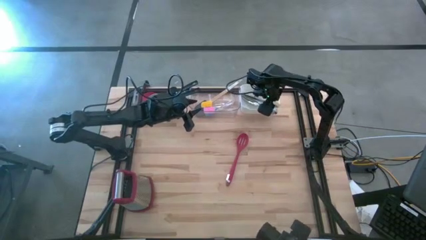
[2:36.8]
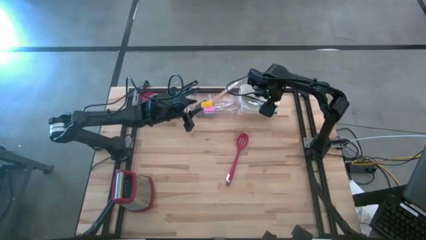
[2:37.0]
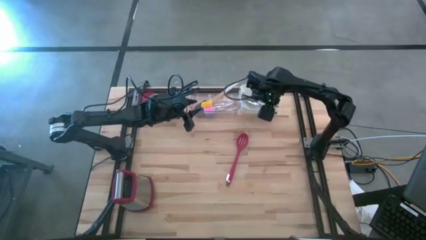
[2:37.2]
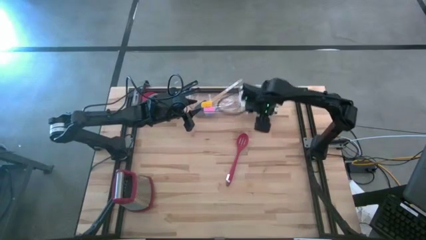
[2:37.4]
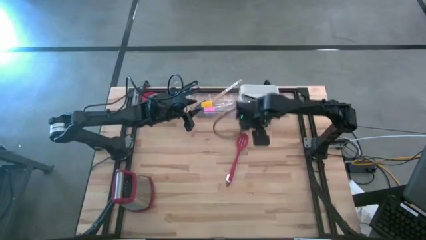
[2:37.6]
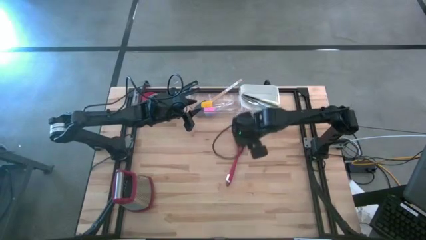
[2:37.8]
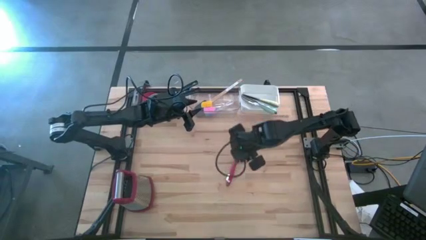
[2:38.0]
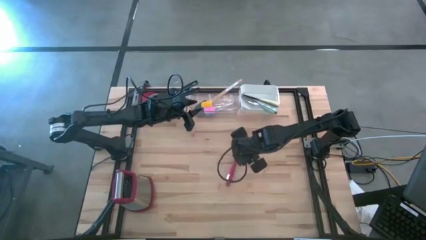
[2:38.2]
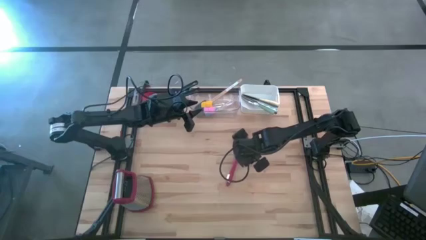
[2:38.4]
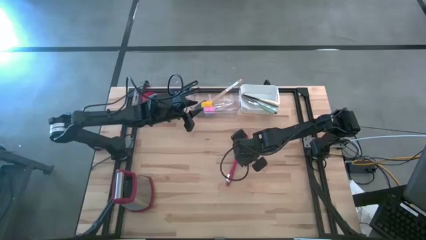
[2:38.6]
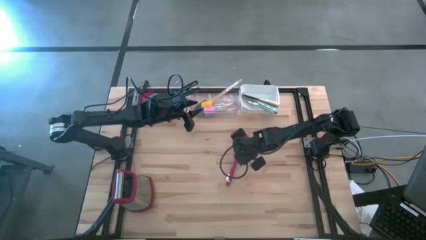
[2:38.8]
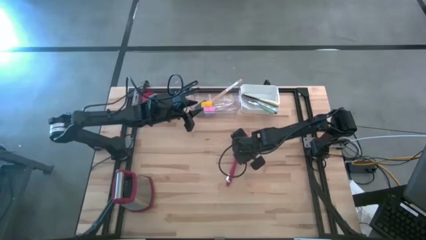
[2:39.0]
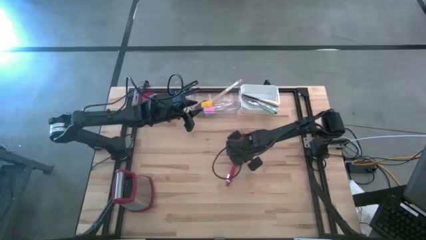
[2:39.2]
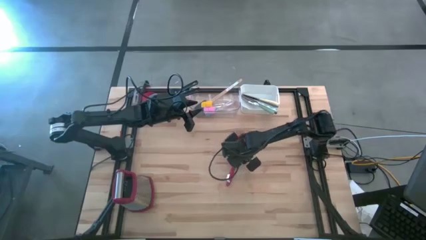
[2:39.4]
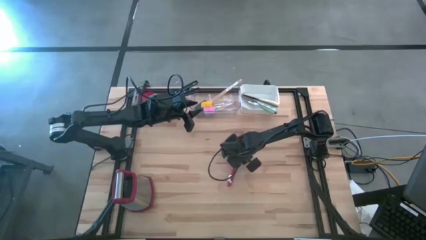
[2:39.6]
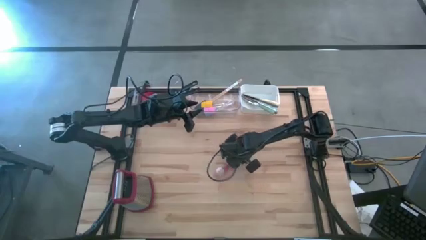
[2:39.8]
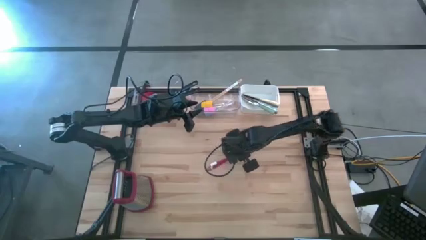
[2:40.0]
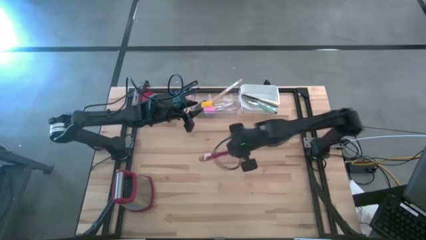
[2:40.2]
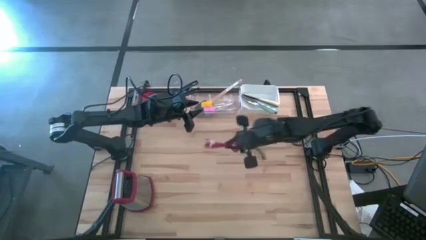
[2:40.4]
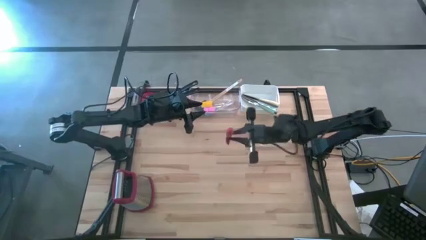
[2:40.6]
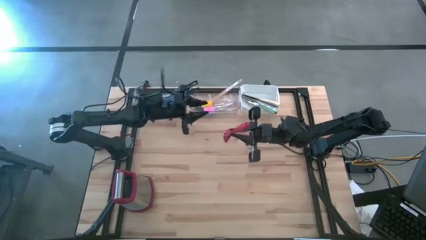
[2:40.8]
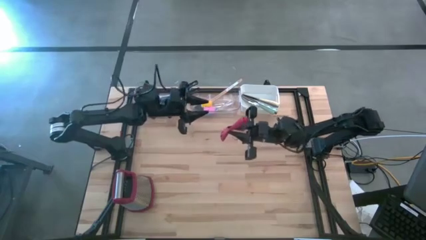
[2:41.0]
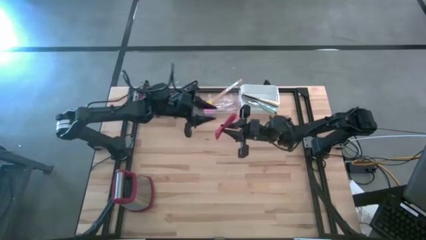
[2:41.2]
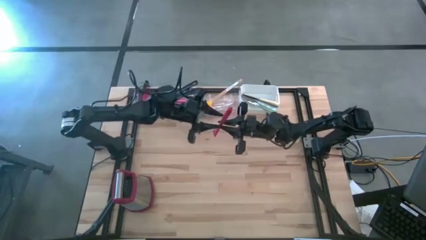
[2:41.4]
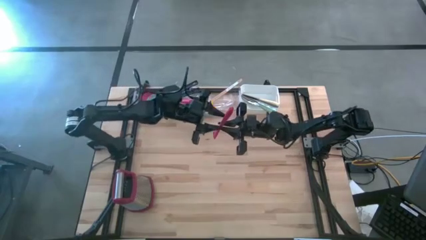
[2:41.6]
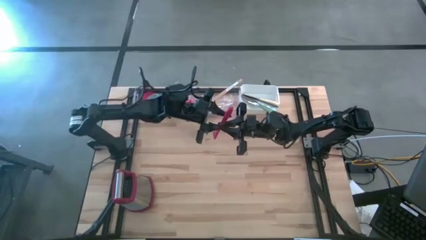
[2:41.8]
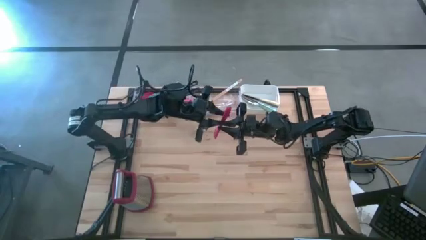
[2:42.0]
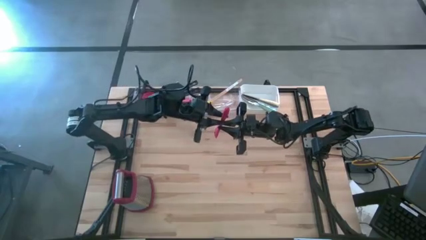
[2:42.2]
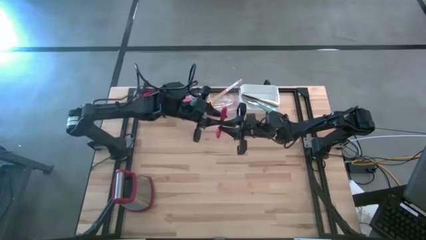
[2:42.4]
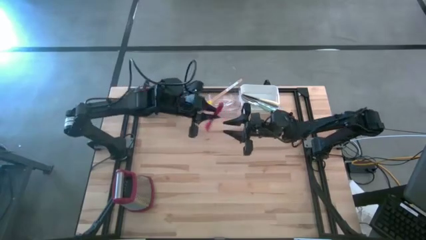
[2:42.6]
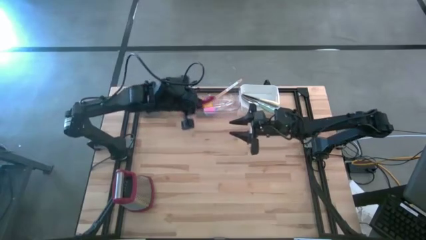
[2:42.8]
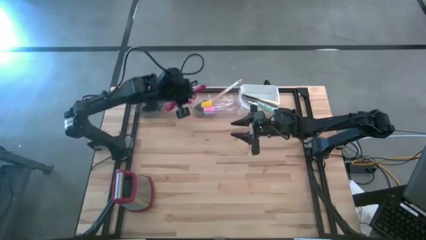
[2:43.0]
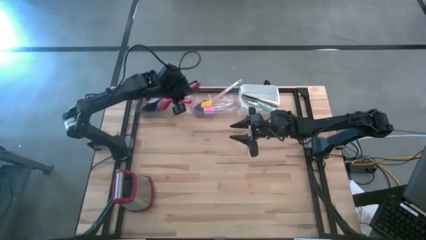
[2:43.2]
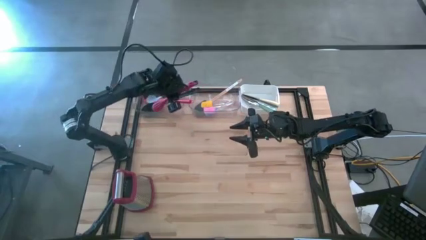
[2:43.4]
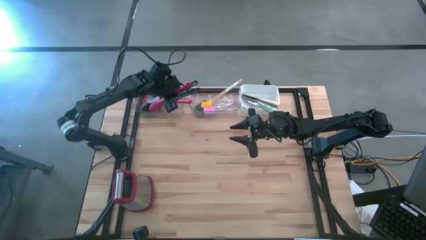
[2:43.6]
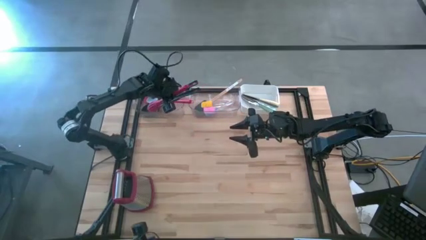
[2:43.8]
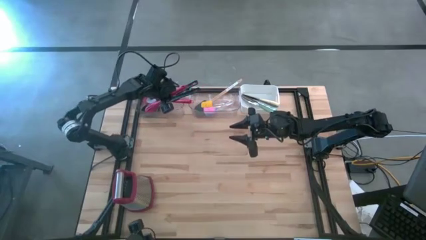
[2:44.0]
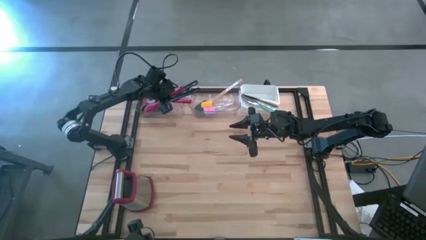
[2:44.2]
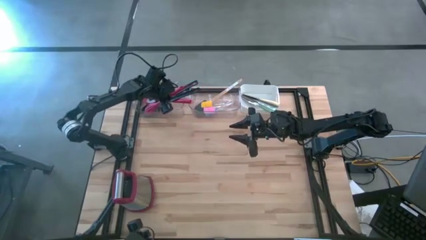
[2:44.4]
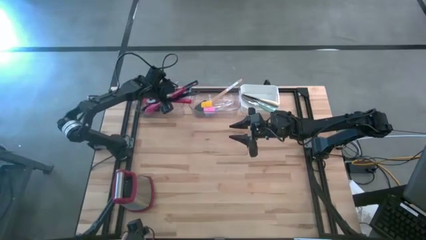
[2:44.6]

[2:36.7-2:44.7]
Task: Pick & Place Kitchen Items
Put the red serving spoon into the left transparent bin

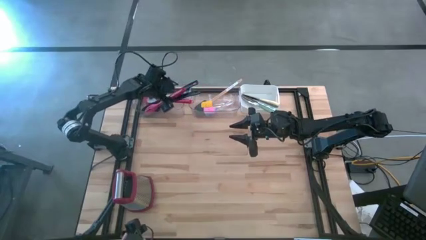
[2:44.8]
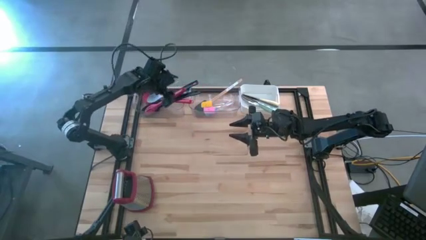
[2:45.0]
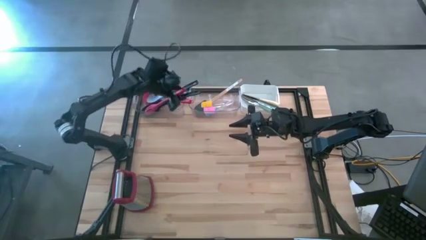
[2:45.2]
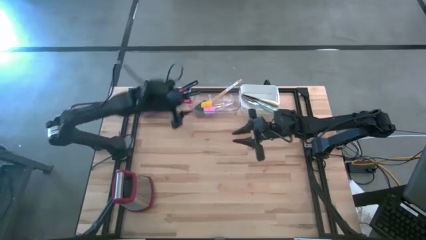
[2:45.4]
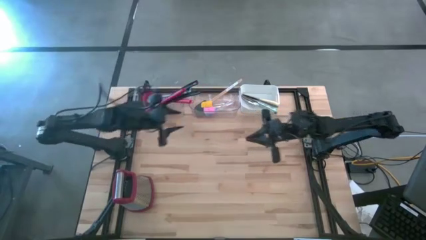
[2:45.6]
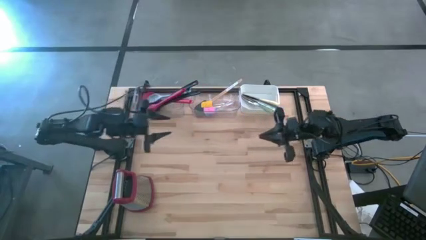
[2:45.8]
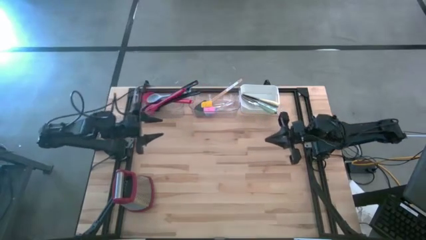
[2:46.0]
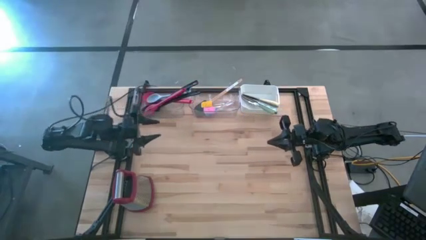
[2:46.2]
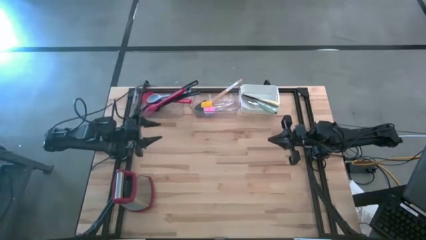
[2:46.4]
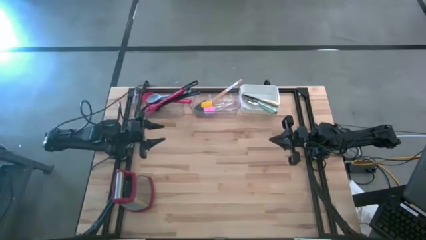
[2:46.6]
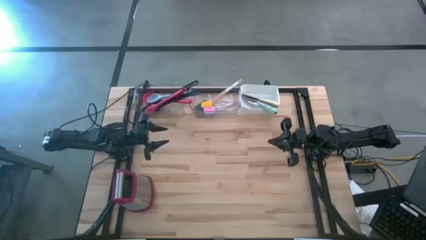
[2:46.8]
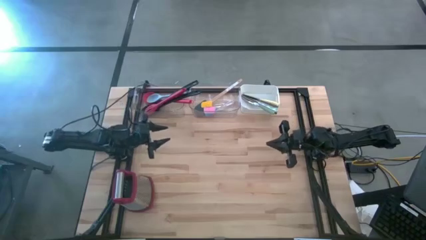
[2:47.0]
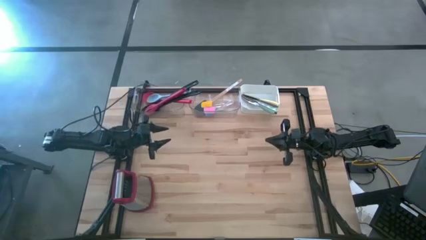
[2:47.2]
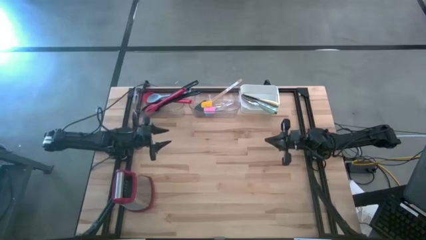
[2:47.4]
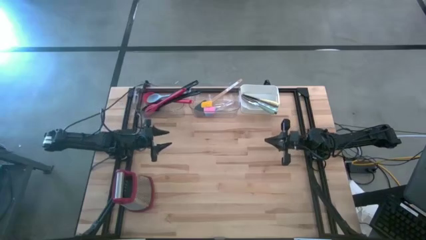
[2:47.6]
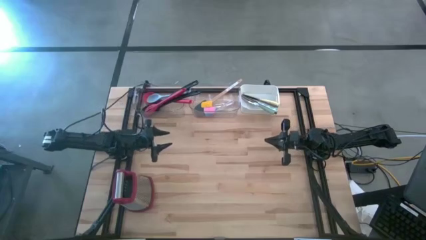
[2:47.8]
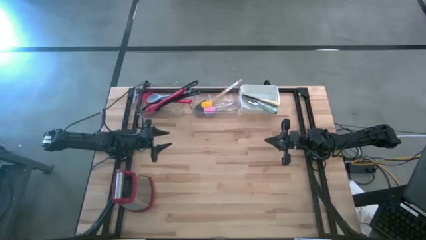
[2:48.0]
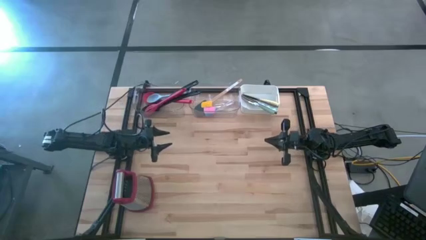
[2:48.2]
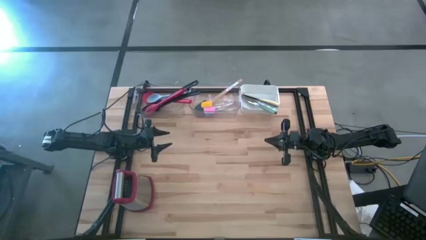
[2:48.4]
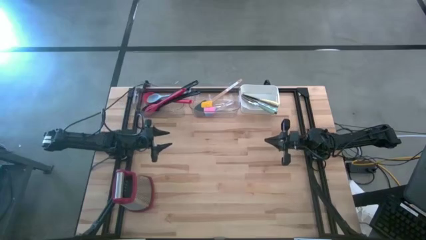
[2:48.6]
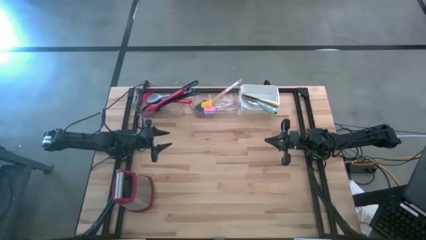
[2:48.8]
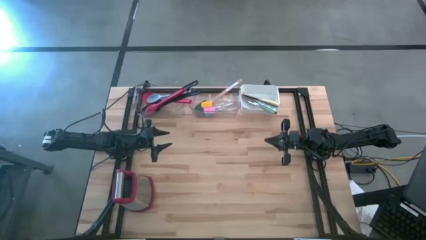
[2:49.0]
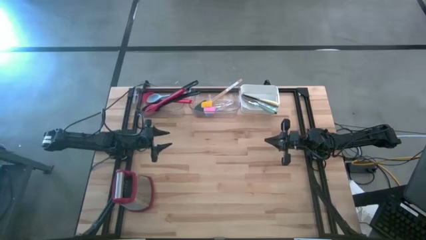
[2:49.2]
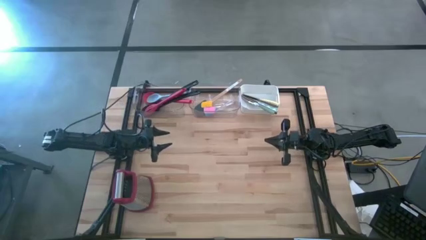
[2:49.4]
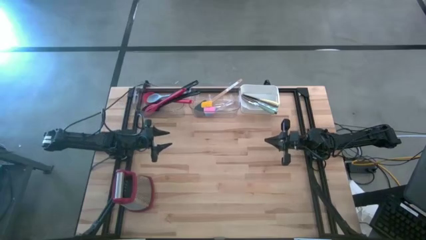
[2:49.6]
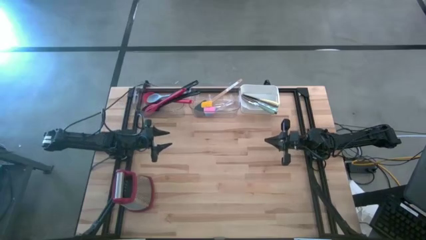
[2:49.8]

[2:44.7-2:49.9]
Return to Home Position

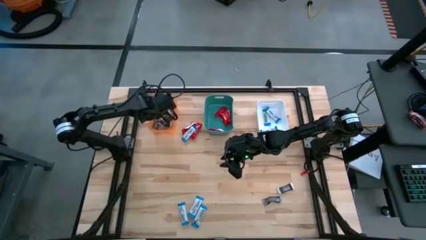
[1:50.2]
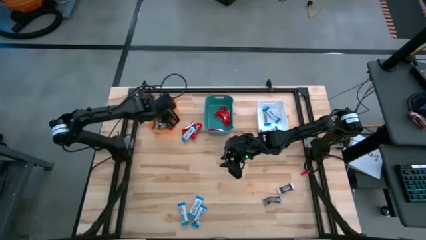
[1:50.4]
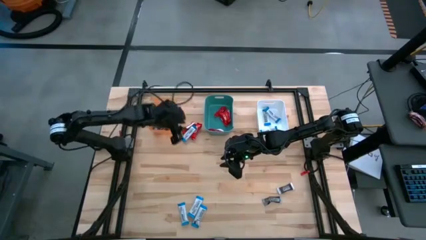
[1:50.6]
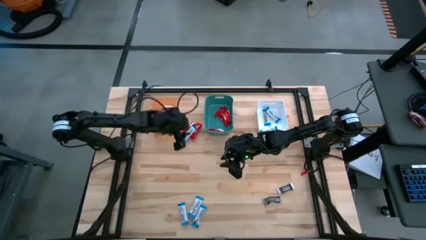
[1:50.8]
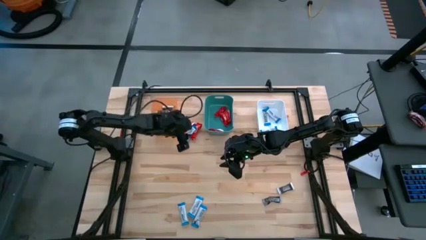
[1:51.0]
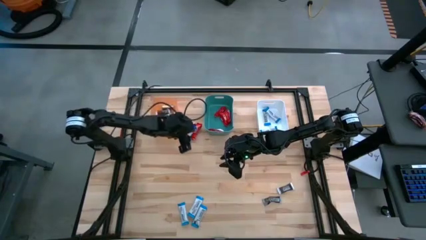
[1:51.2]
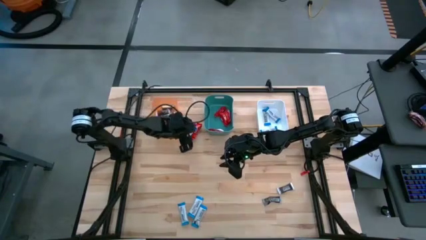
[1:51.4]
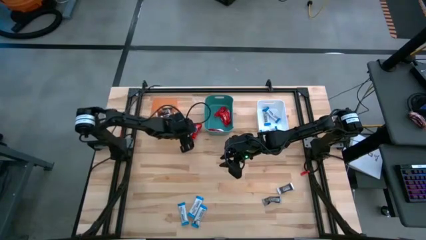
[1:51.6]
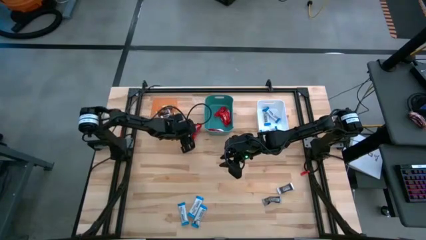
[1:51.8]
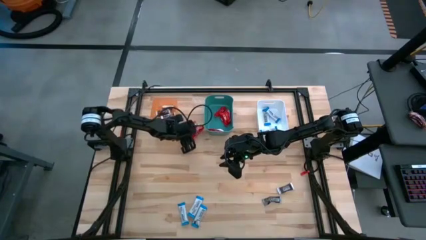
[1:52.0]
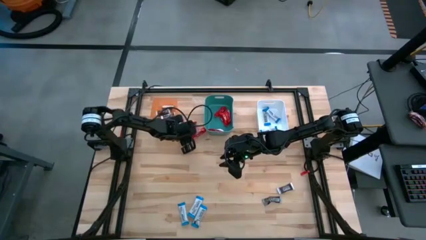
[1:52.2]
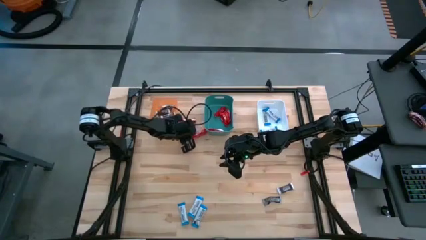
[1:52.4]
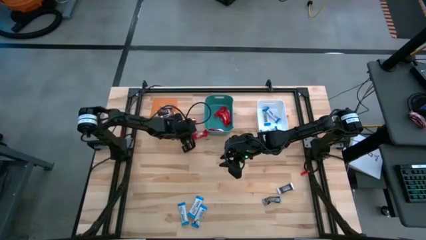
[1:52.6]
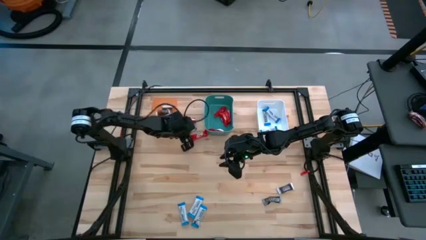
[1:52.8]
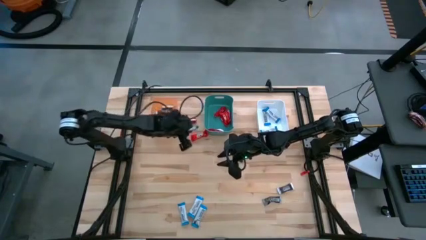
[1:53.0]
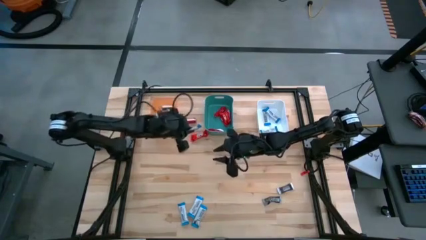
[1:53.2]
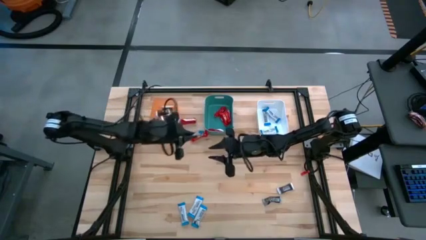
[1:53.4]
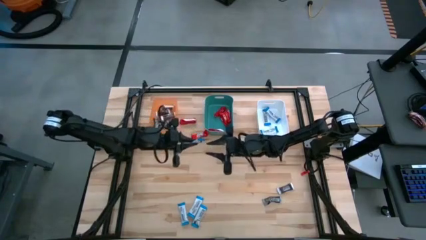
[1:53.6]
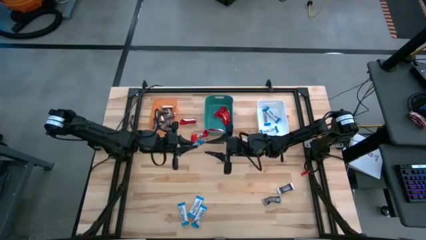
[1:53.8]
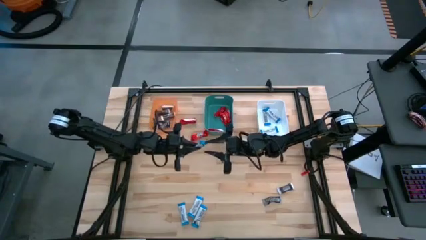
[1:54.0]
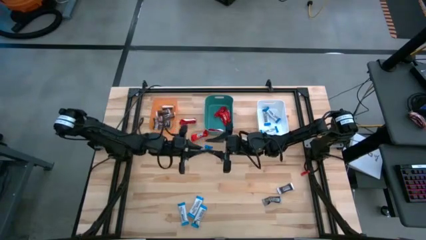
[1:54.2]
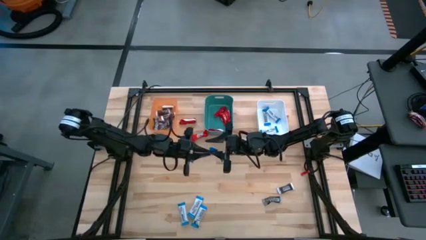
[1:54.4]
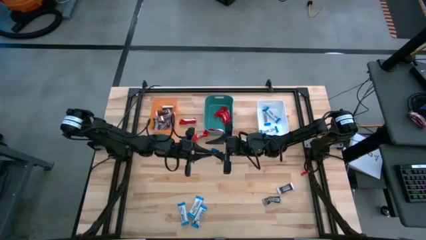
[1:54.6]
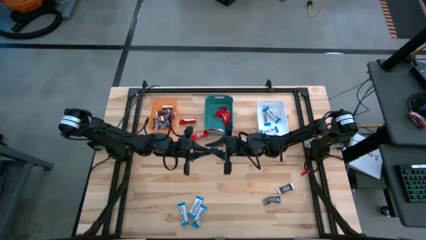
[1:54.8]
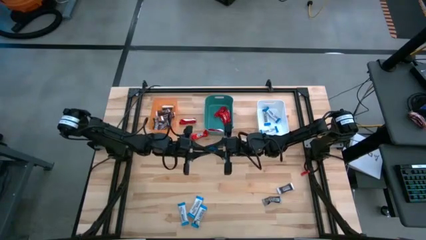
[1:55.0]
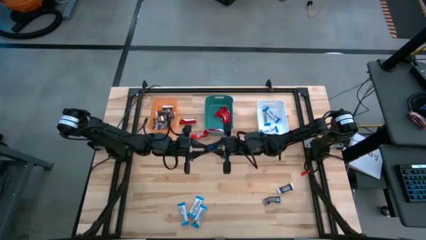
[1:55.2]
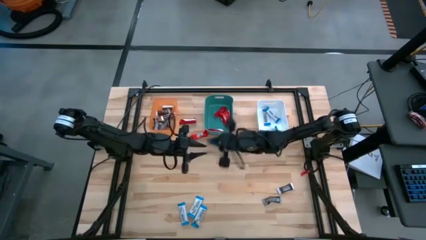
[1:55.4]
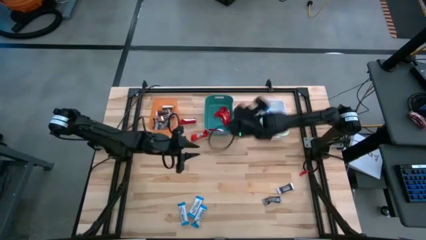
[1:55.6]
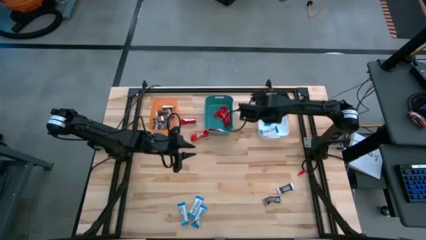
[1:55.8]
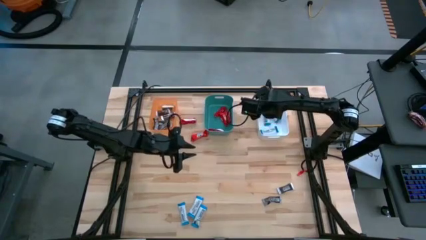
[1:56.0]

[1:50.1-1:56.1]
Task: Organize candy in baskets
Put the white chocolate bar into the white bin
